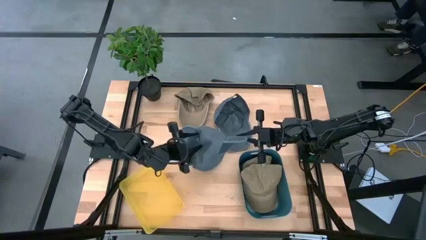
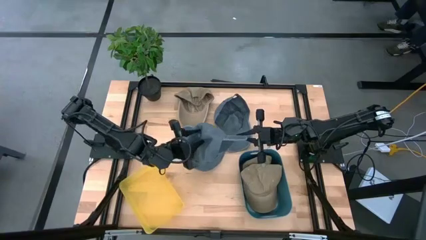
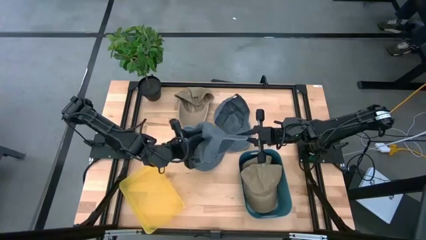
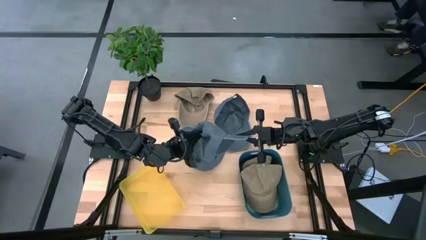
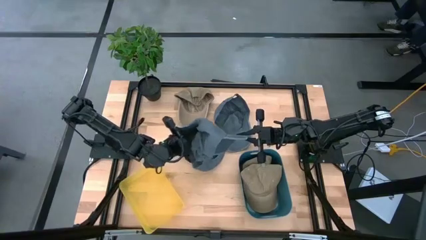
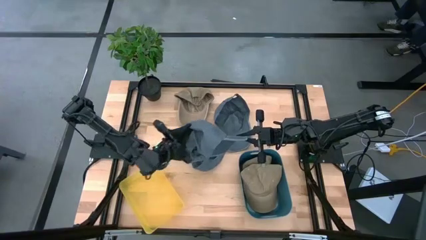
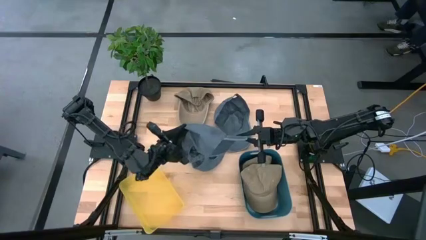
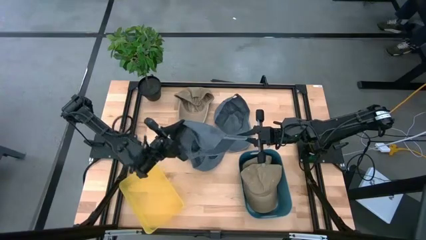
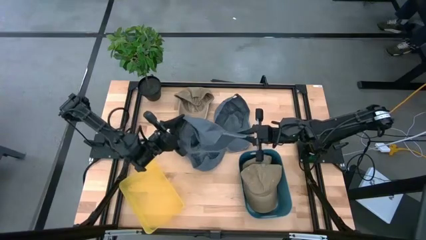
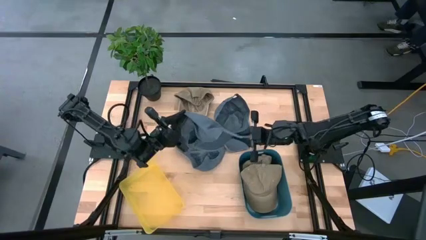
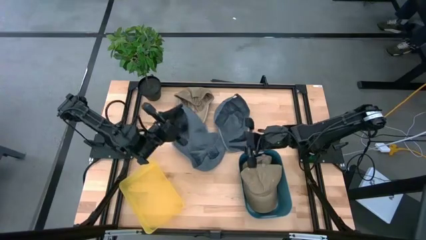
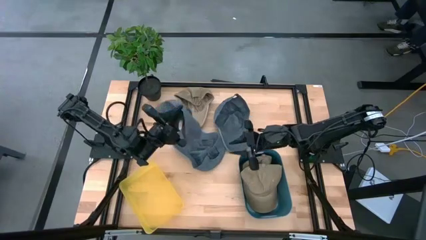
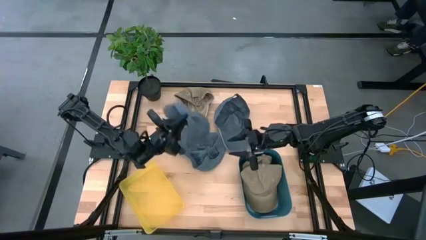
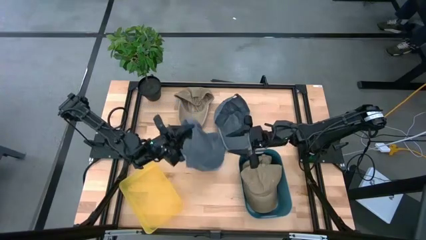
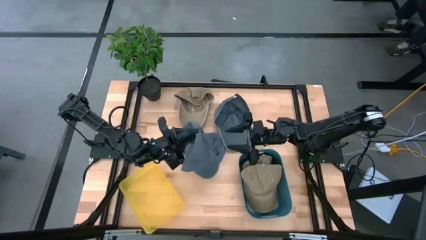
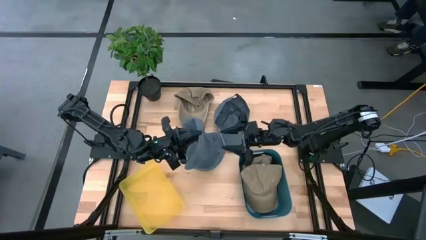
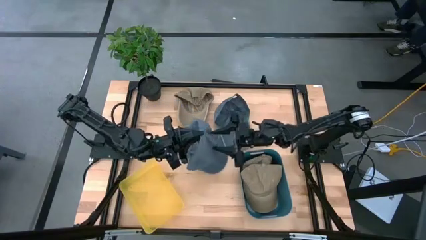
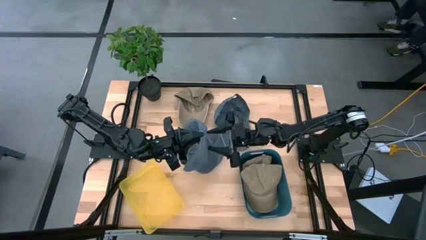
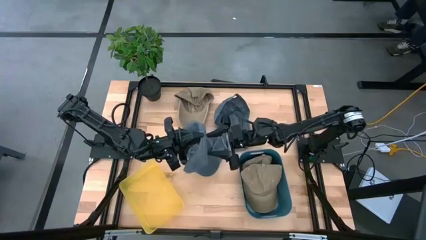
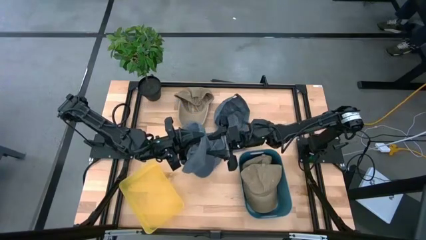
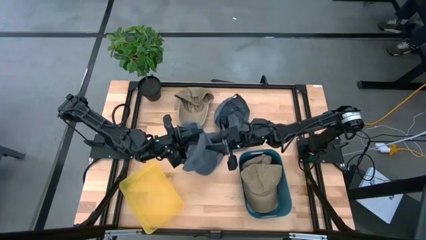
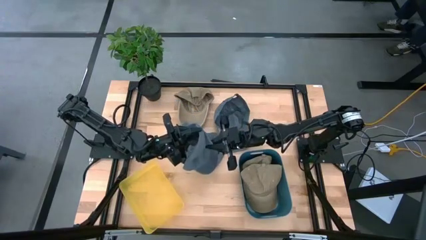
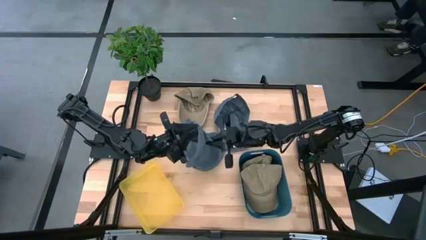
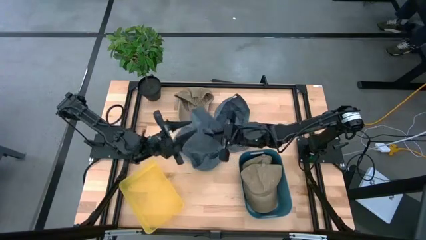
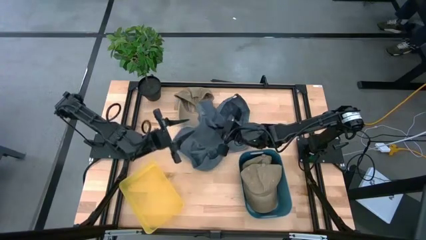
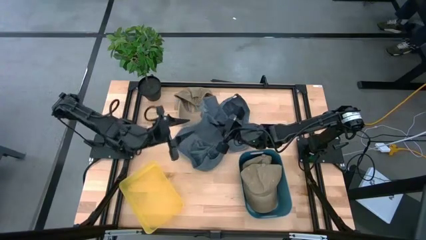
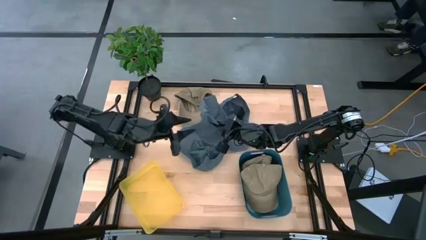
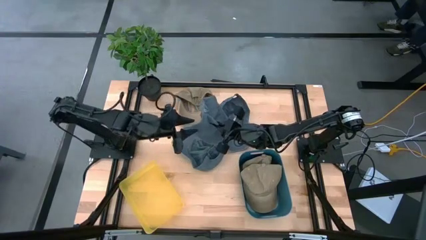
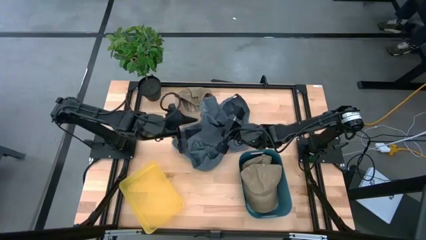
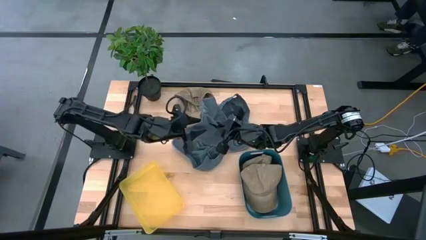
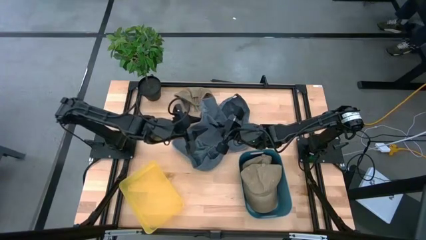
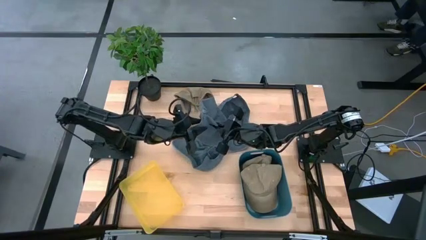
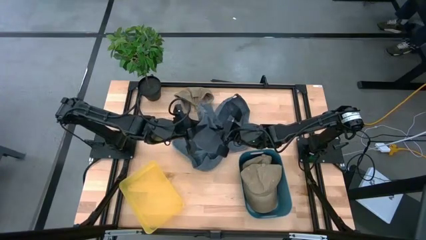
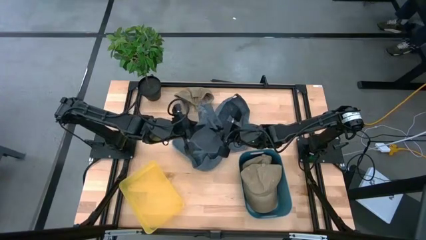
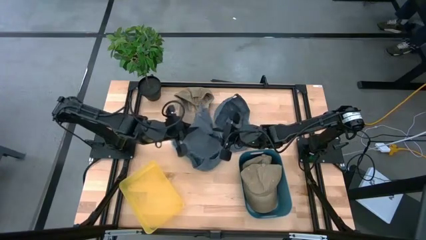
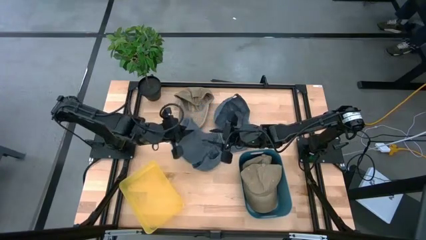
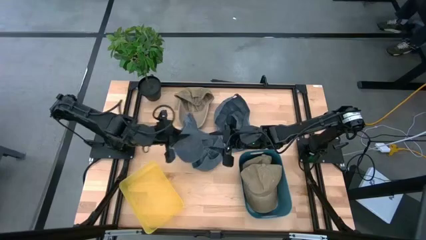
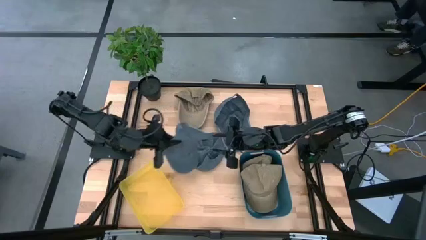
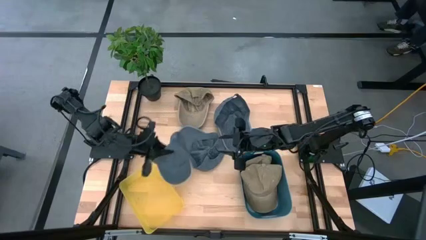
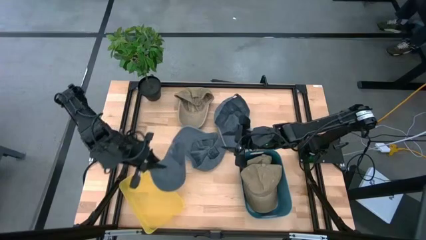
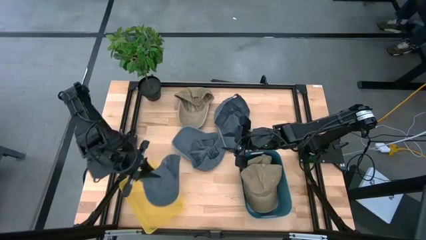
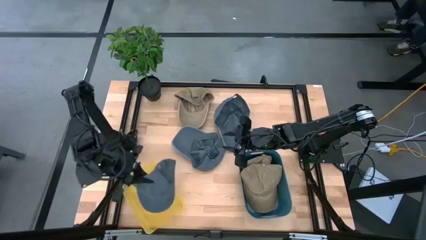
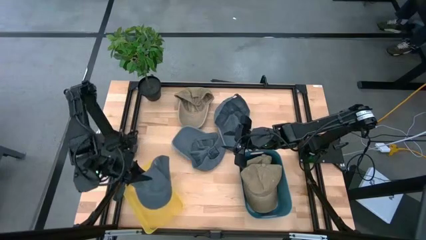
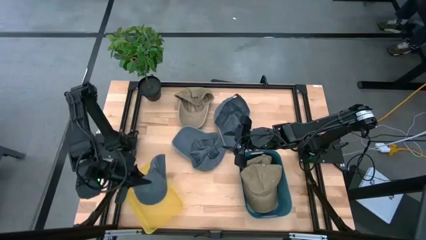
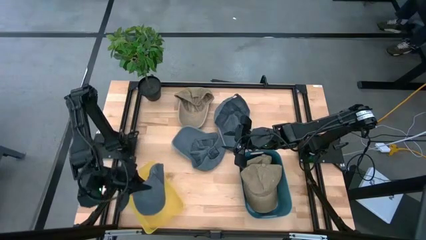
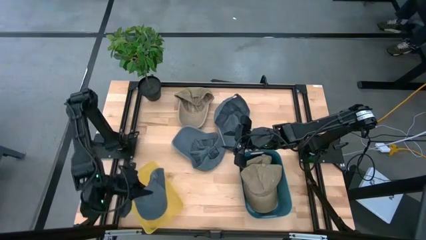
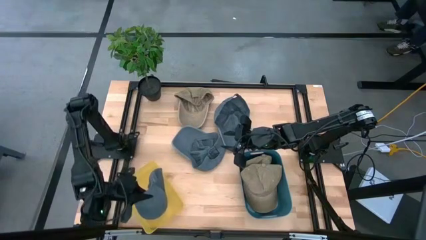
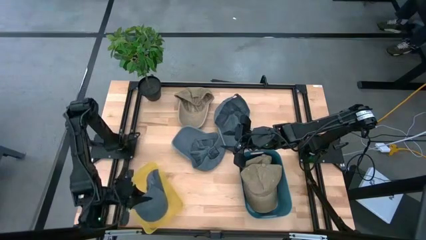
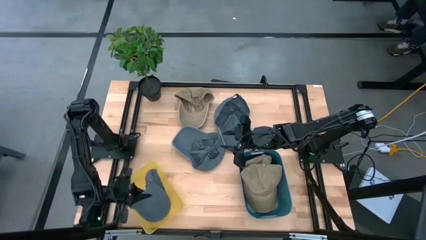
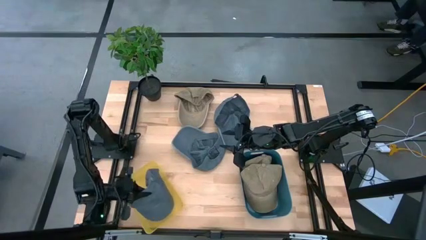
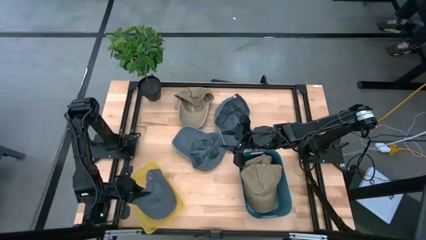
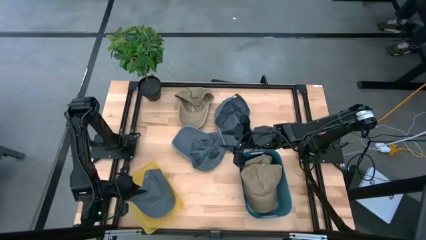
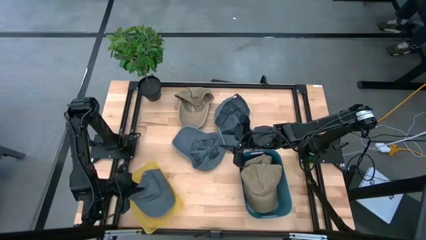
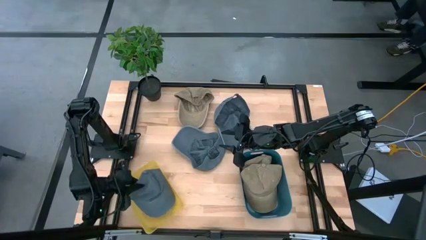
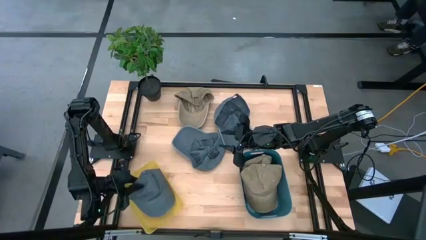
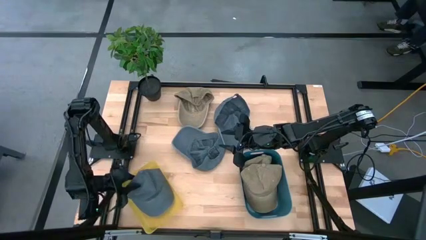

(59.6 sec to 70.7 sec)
Task: Pick & Place hat
Put the left gray cap into the yellow bin

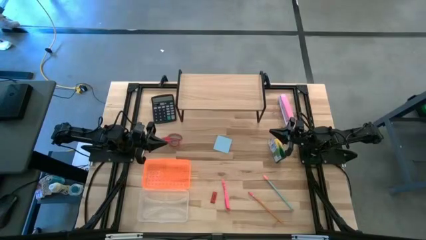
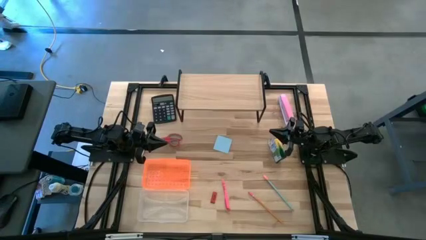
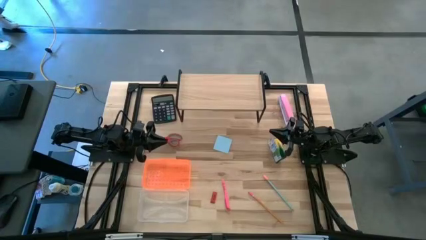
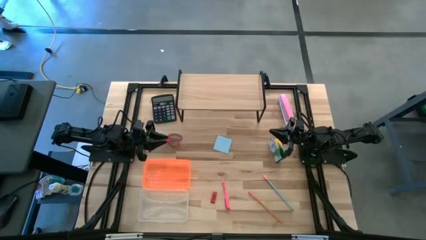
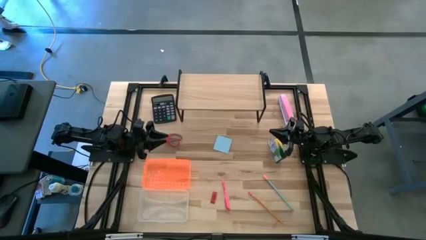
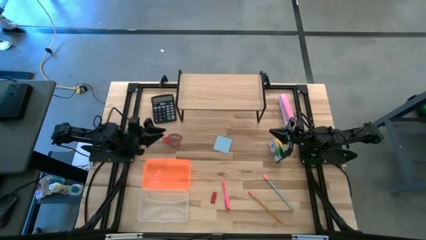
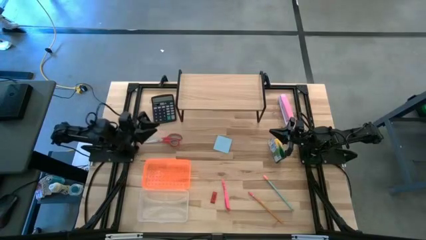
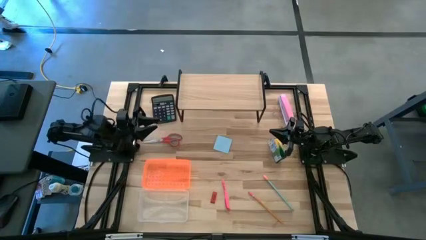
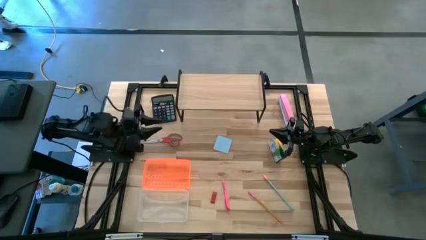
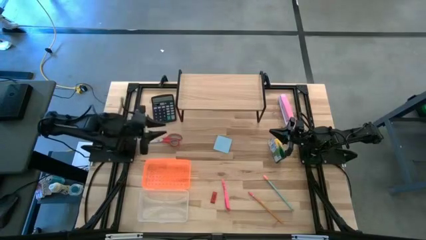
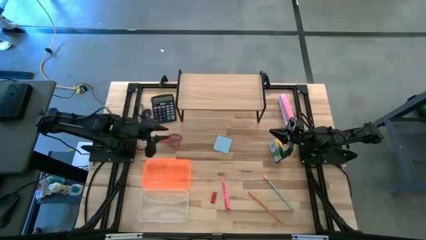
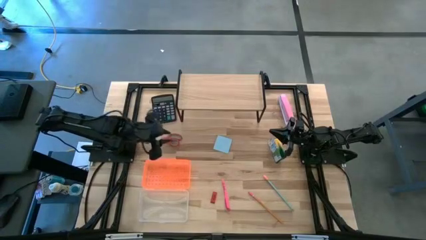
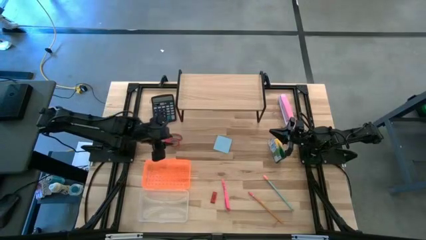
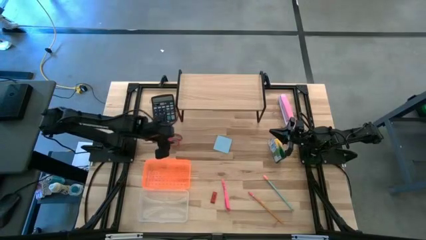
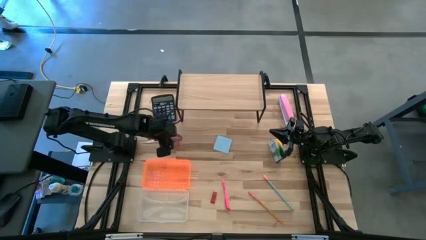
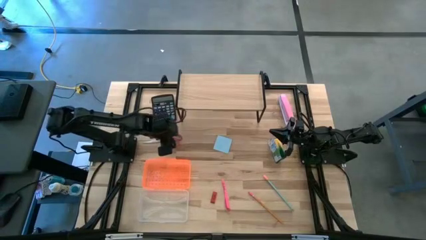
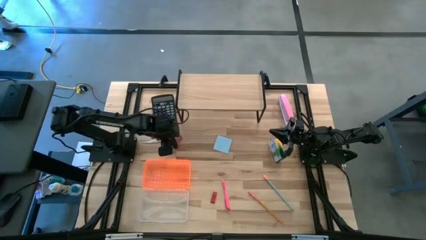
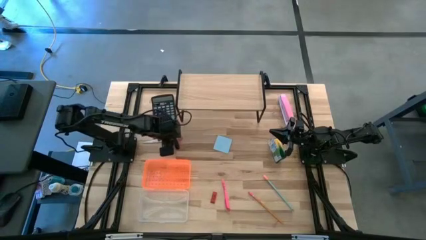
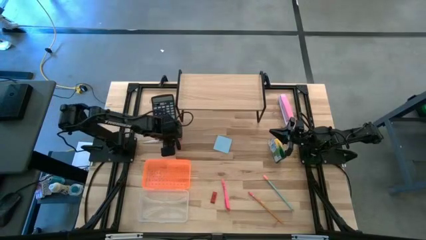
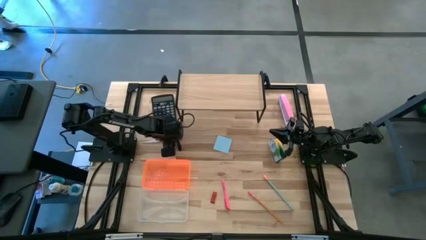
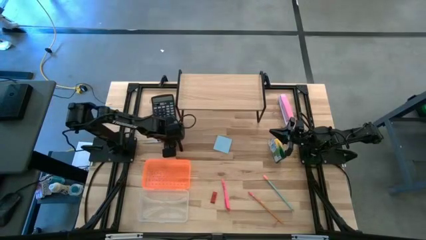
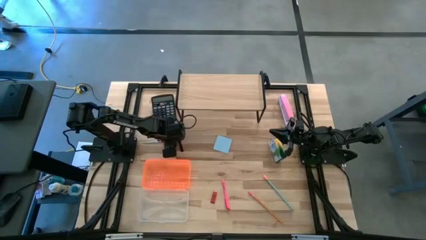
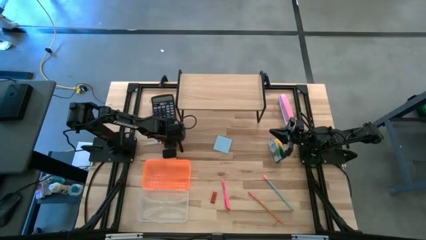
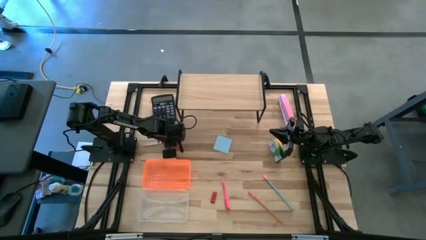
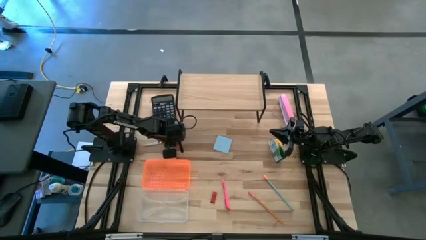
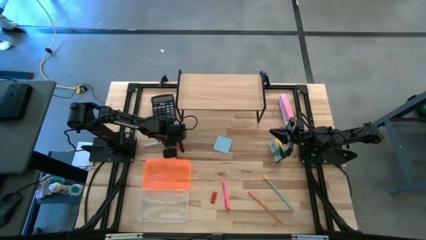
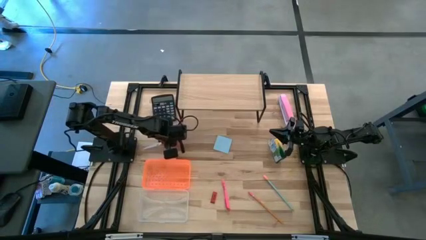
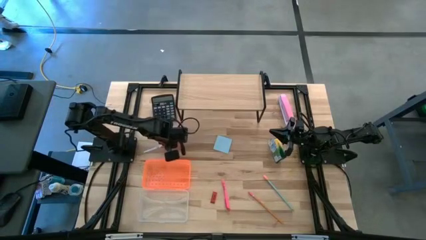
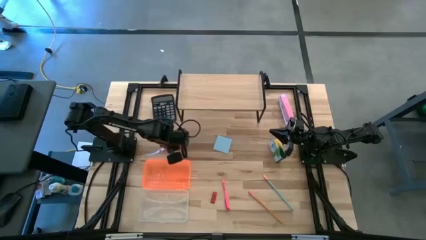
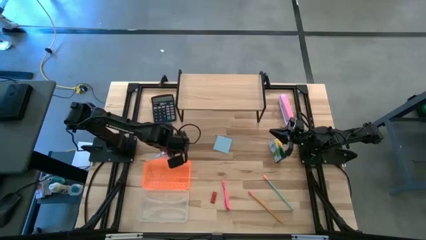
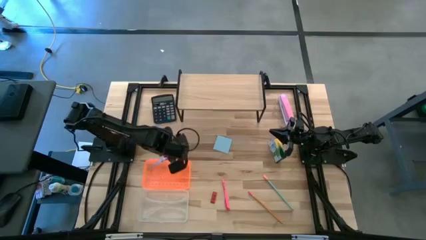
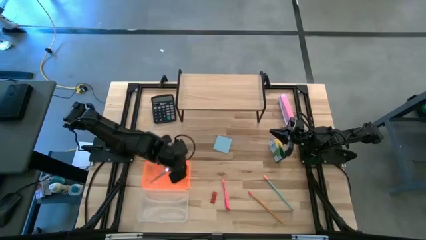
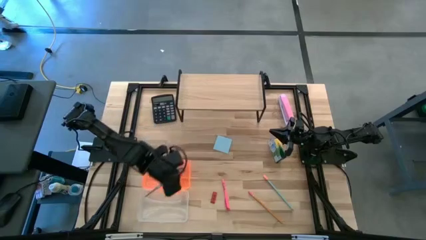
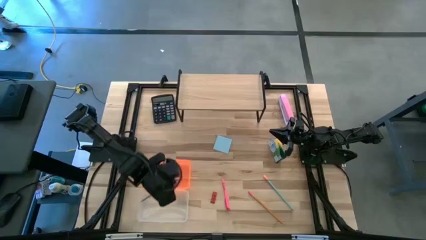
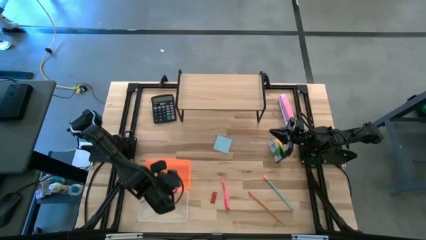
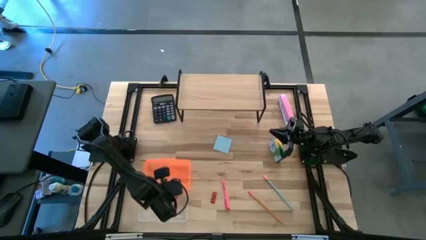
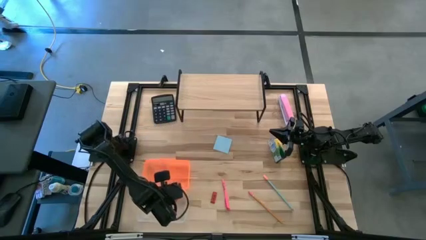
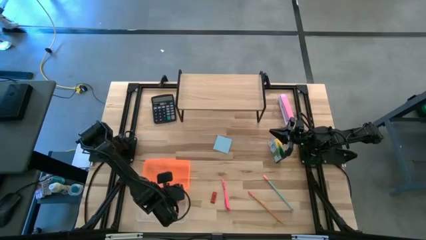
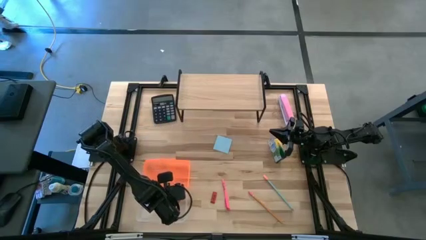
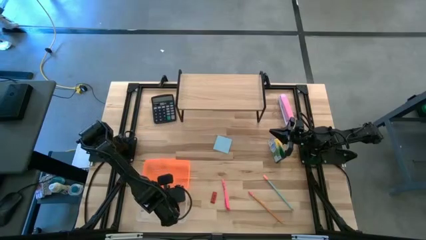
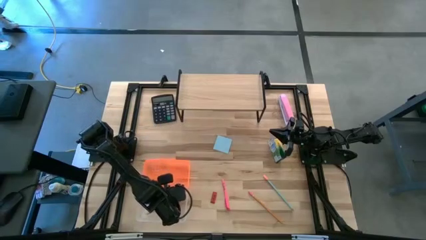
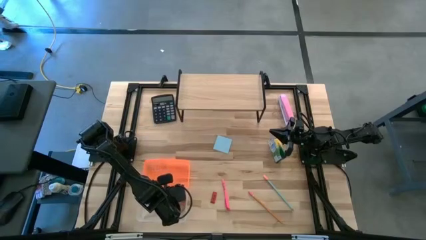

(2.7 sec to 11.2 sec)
Task: Pack school essentials
Put the red scissors into the supply box
